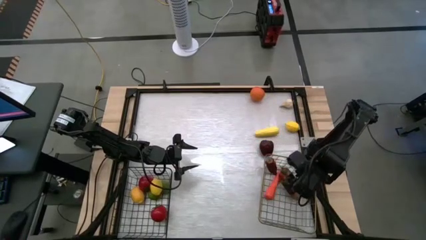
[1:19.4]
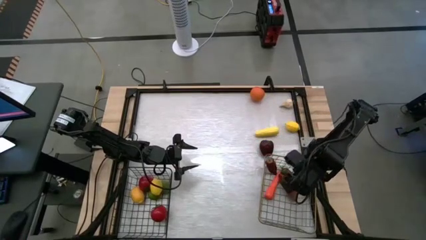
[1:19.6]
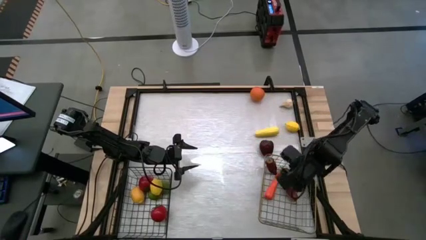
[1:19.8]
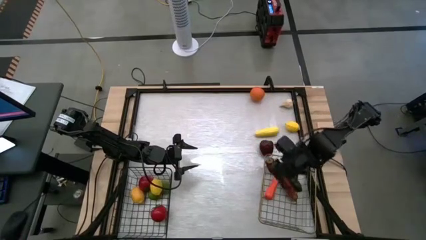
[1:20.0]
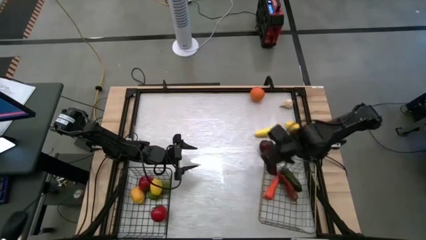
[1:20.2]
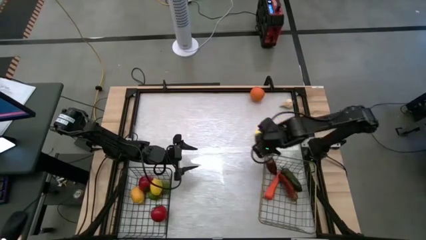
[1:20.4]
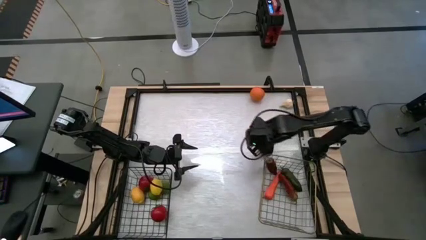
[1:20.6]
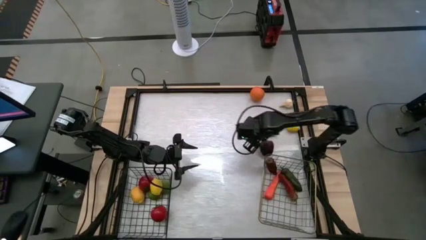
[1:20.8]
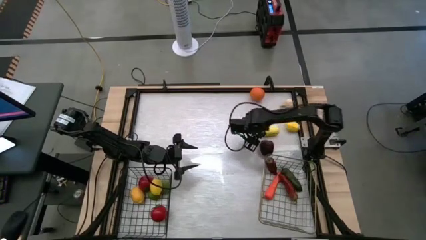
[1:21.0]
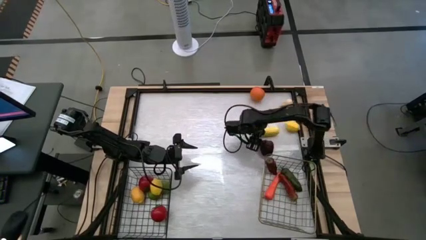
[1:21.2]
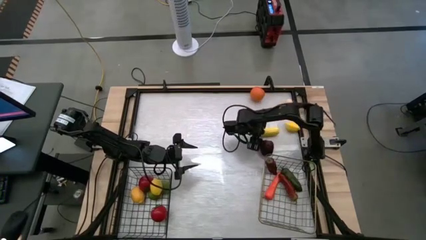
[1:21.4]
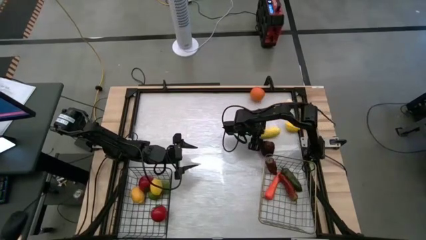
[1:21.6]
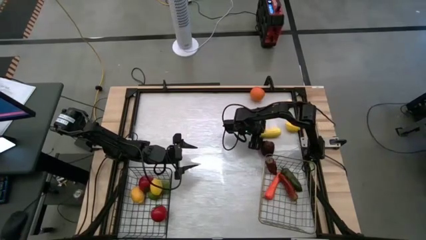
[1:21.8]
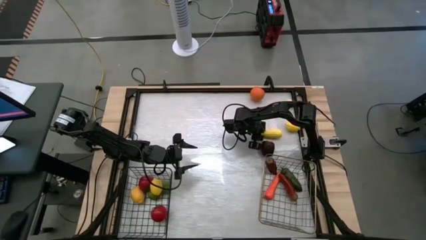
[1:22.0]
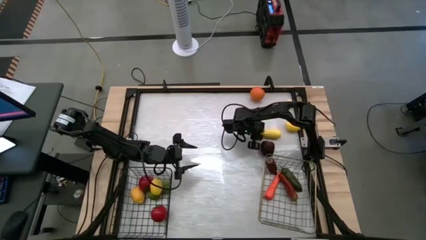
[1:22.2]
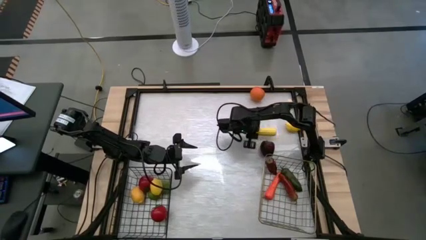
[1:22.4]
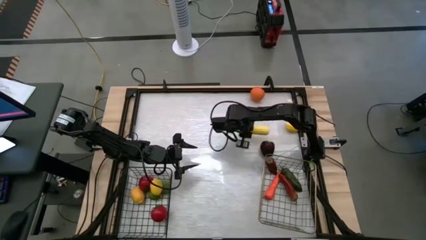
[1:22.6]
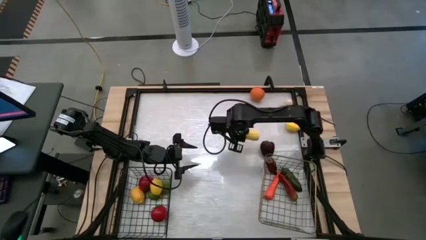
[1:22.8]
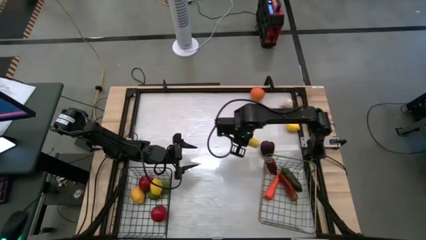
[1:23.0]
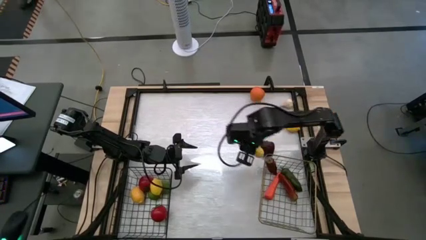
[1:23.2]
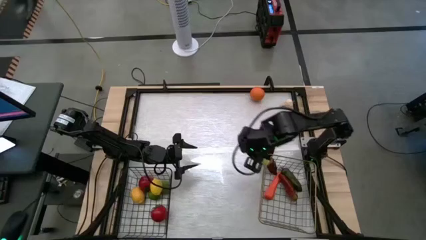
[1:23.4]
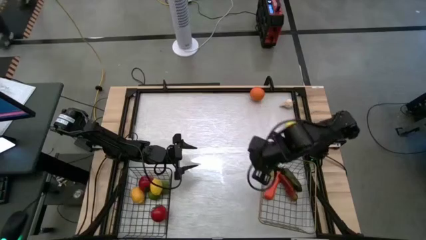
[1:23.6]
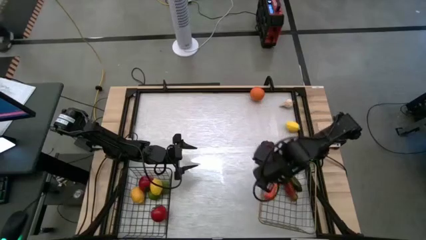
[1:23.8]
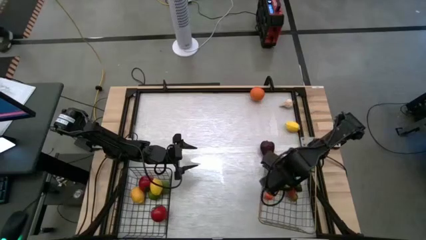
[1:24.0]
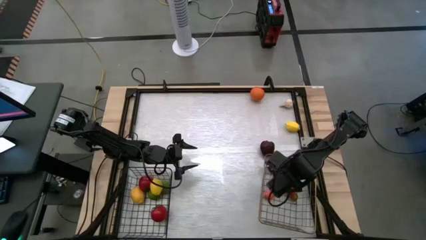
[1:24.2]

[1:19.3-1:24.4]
Task: Sort produce into baskets
Put the yellow corn into the gold wire basket

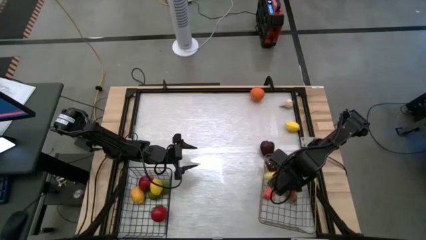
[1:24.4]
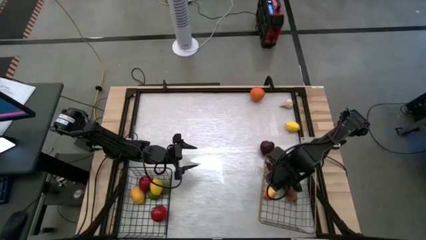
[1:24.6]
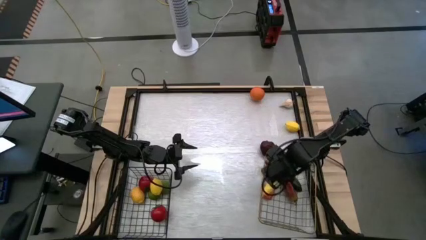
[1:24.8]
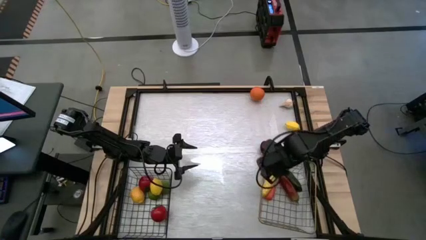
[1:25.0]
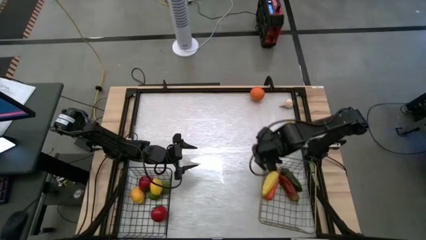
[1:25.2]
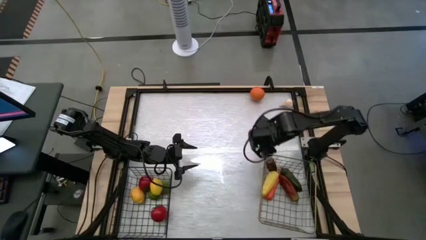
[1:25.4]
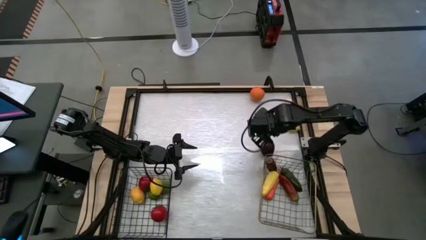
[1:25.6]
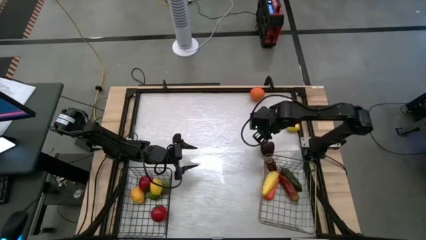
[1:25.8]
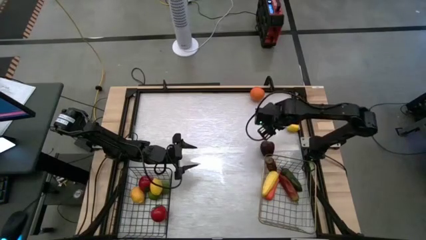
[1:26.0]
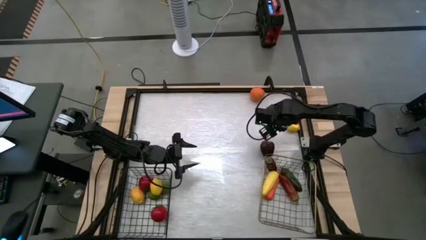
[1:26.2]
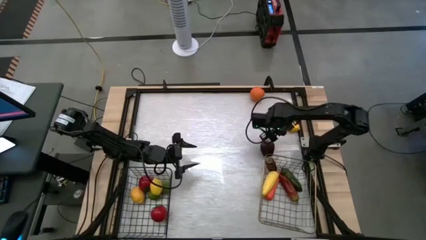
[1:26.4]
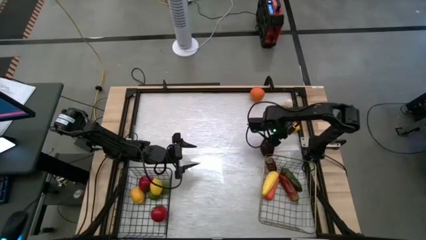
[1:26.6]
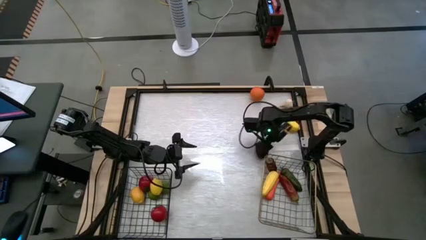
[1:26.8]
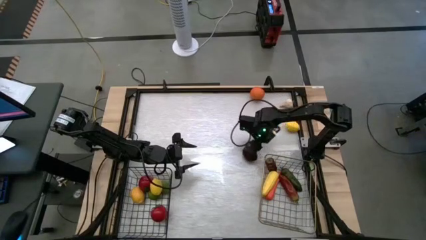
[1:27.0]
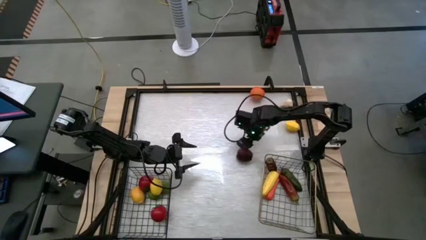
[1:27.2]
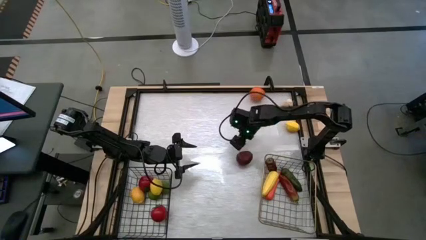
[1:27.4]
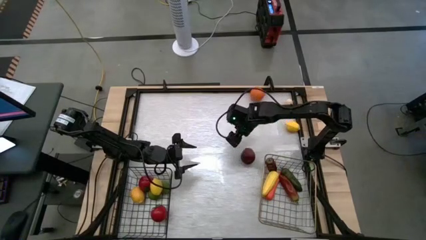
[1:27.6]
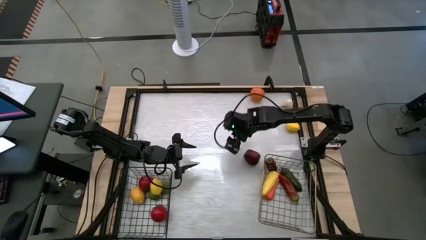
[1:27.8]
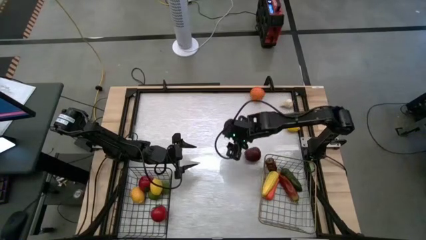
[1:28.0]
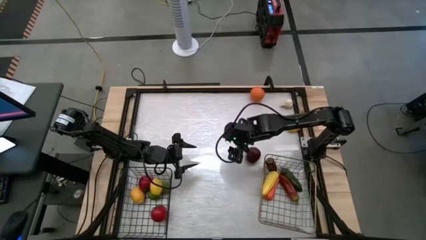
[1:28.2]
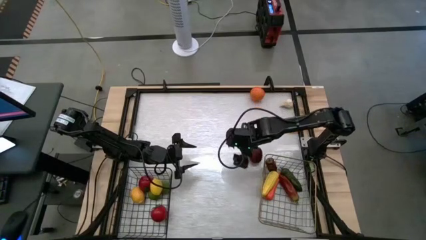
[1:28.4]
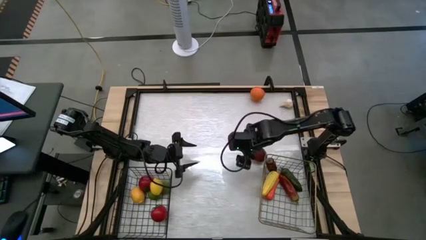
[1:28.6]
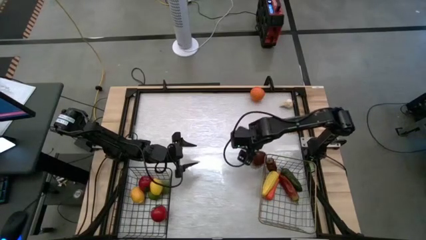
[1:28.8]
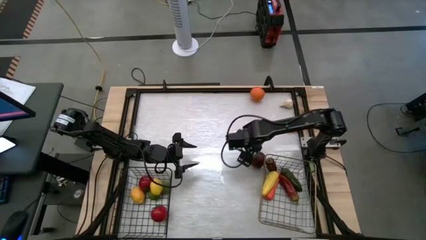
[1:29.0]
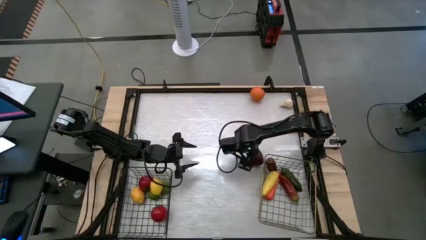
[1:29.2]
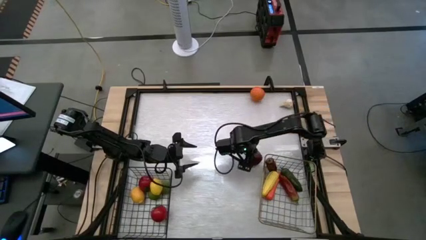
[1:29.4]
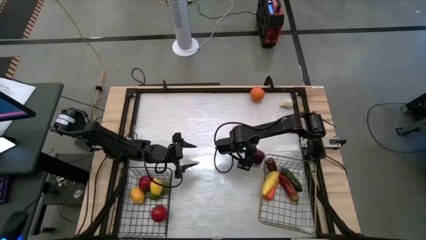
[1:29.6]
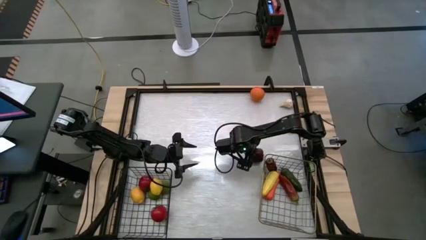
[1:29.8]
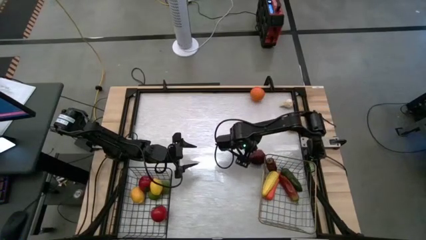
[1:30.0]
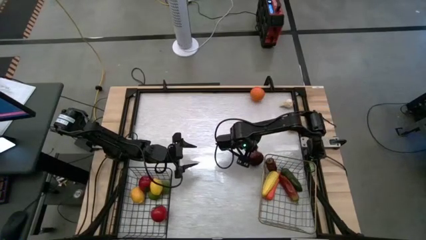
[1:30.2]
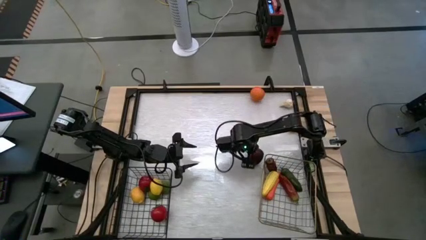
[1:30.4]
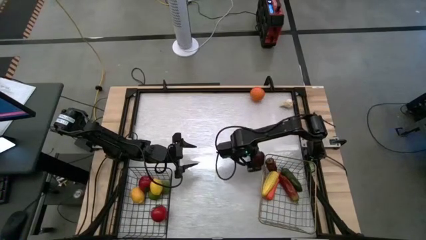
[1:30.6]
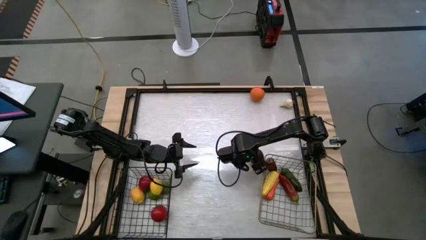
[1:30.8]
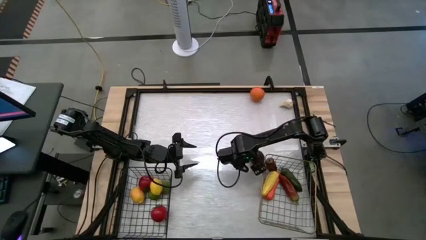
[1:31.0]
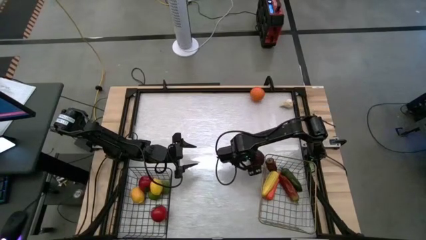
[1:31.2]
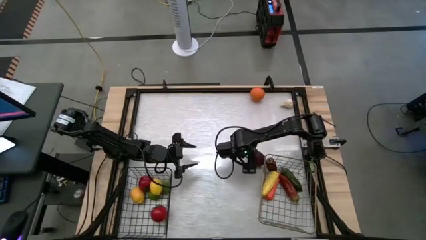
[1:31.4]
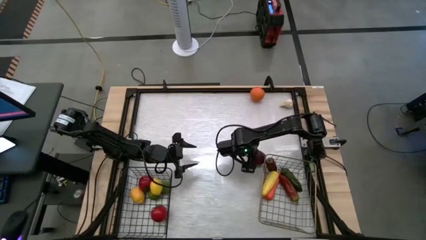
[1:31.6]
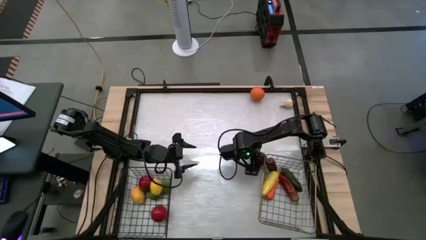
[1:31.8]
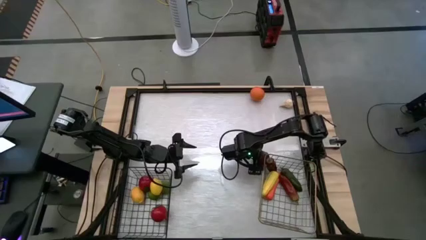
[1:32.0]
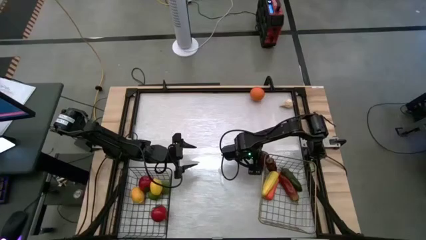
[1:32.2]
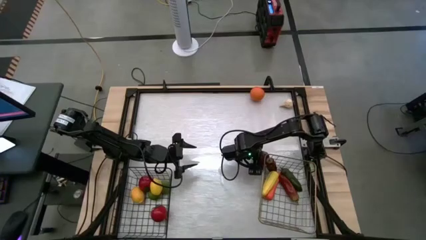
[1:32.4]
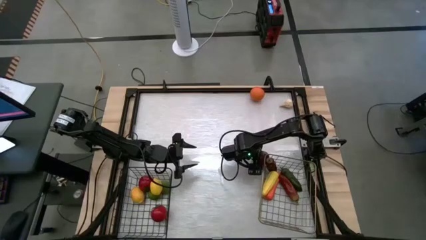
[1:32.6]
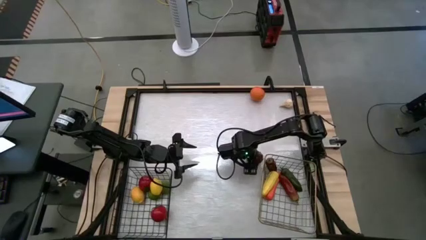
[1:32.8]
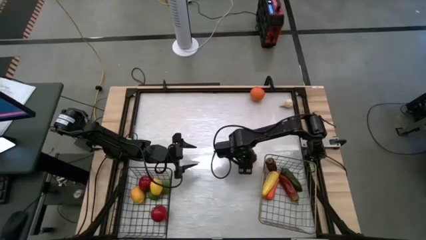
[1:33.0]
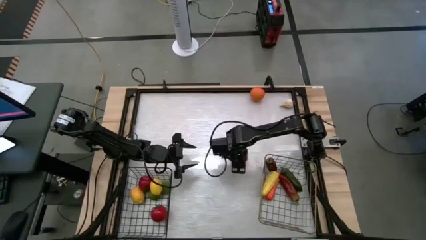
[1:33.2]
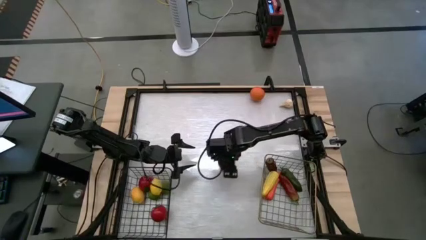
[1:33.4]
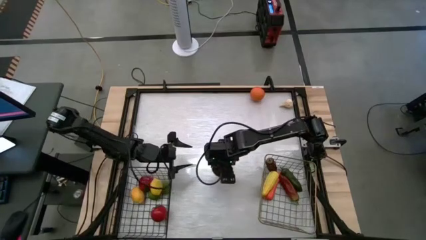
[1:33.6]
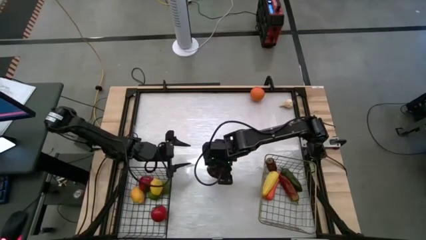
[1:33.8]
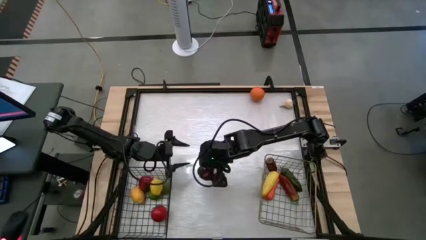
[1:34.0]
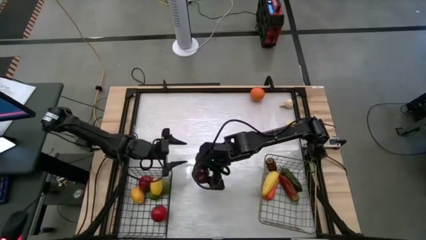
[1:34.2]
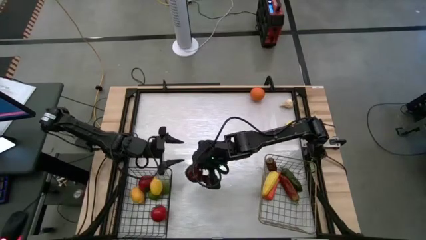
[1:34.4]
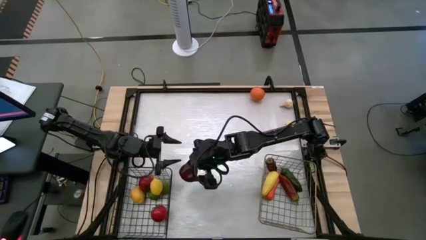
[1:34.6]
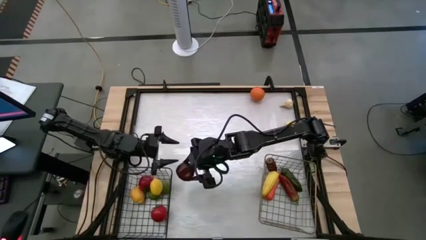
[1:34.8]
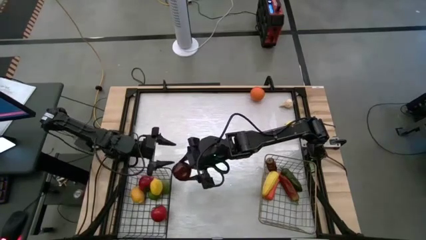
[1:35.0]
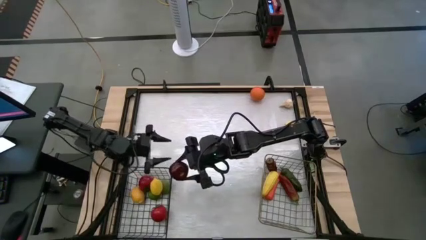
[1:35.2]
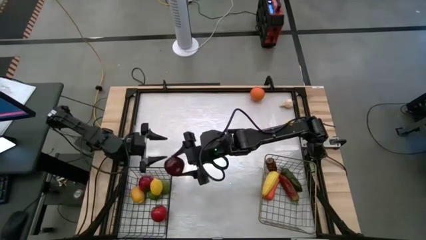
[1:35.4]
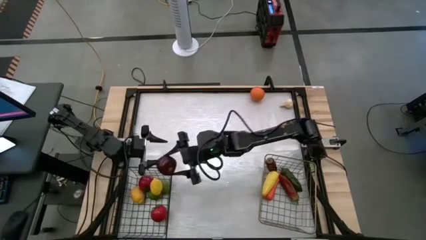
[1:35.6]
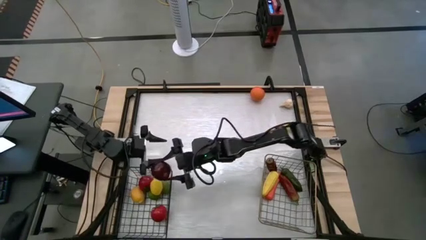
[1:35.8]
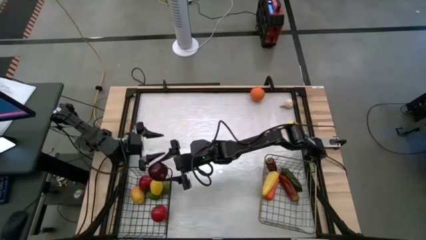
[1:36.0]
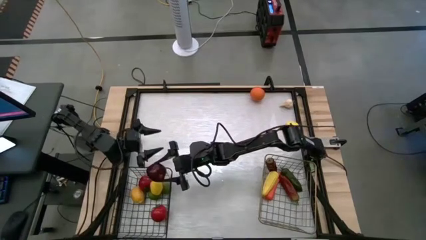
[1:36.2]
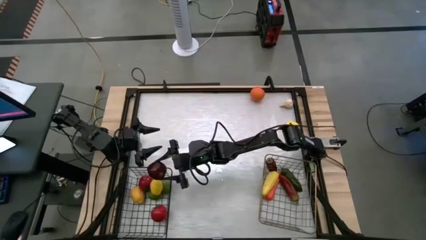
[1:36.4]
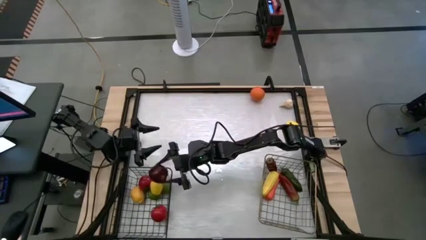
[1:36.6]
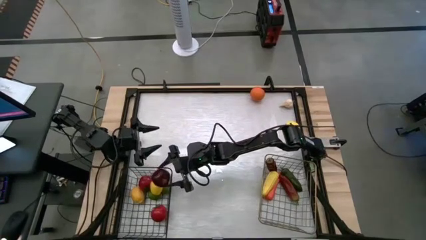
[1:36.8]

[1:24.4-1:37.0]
Put the red apple into the black wire basket
